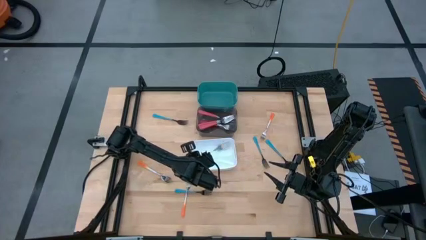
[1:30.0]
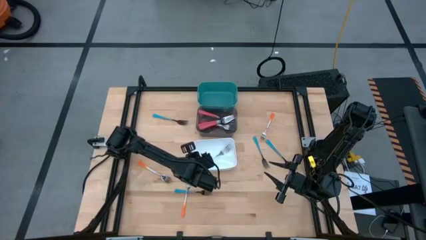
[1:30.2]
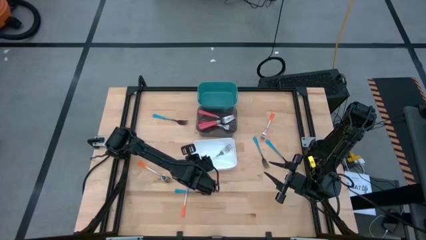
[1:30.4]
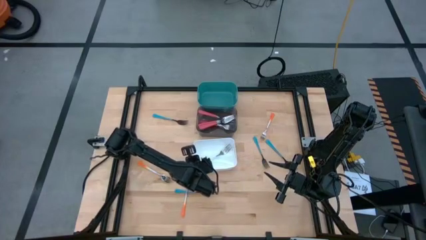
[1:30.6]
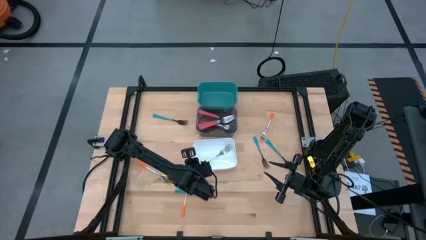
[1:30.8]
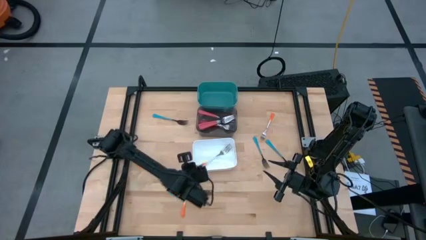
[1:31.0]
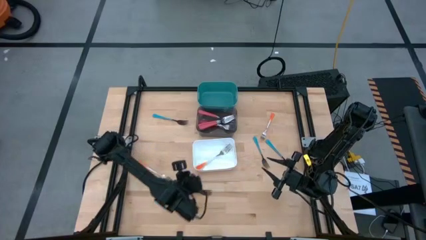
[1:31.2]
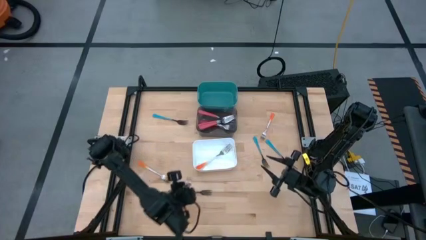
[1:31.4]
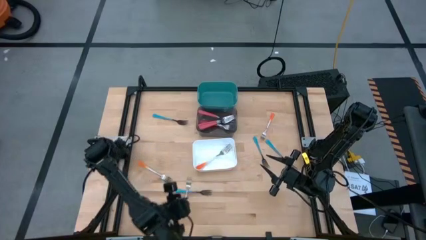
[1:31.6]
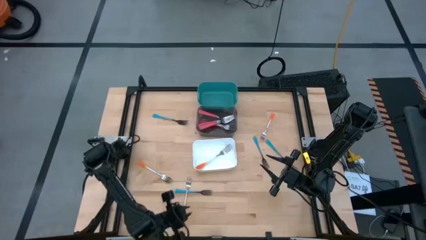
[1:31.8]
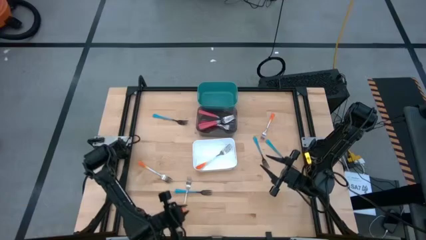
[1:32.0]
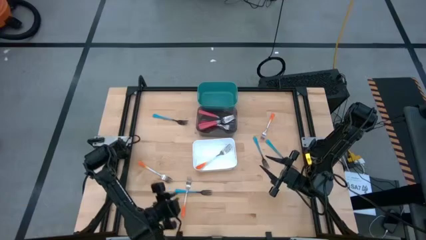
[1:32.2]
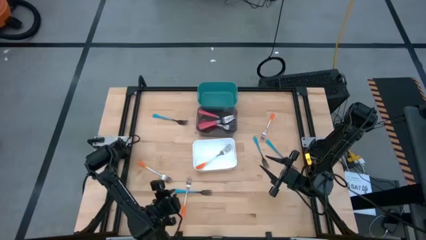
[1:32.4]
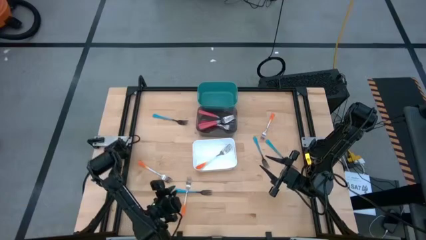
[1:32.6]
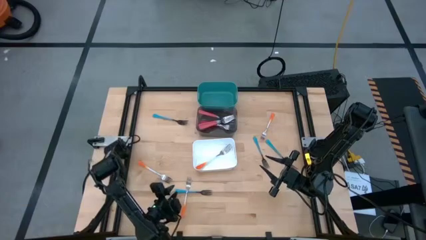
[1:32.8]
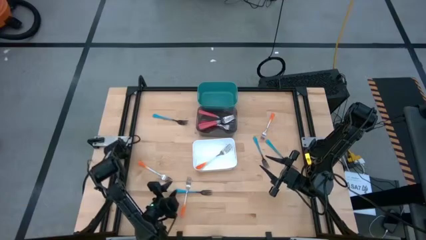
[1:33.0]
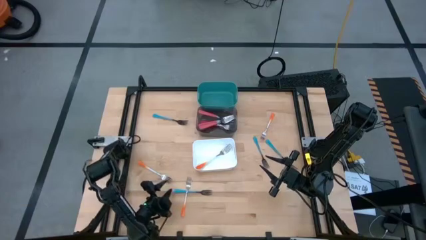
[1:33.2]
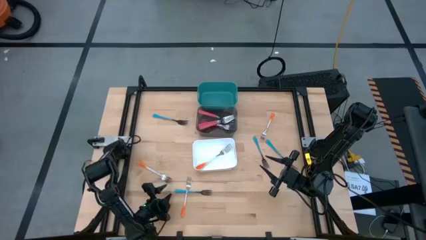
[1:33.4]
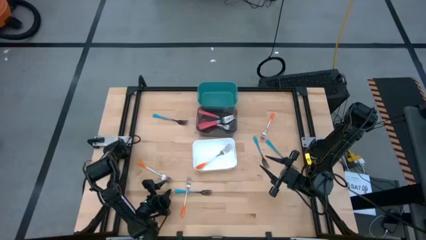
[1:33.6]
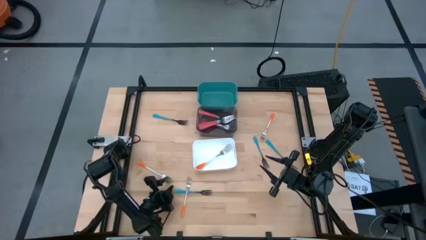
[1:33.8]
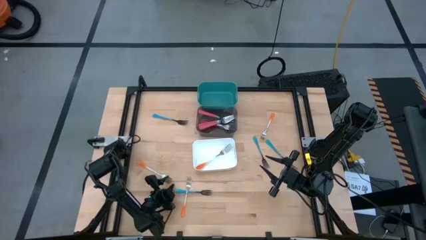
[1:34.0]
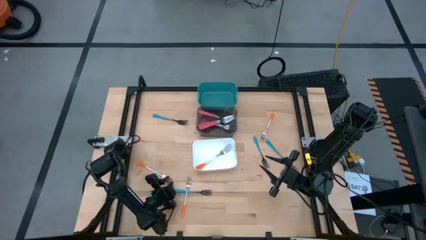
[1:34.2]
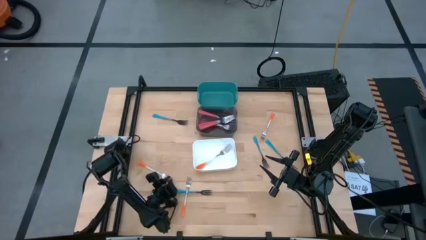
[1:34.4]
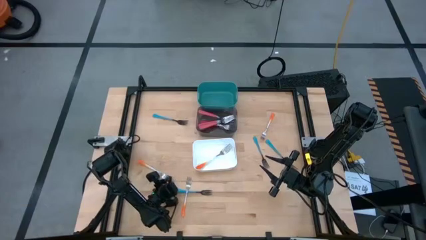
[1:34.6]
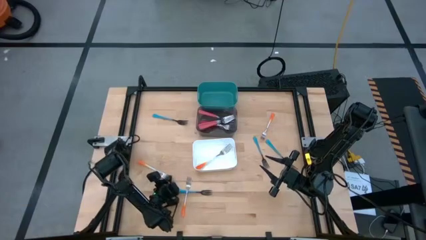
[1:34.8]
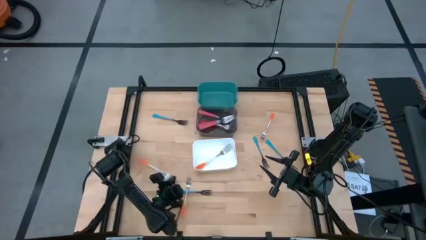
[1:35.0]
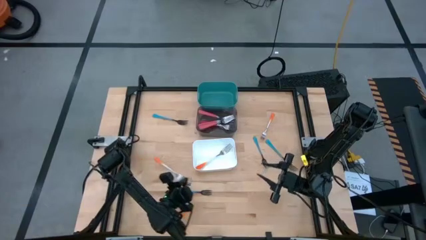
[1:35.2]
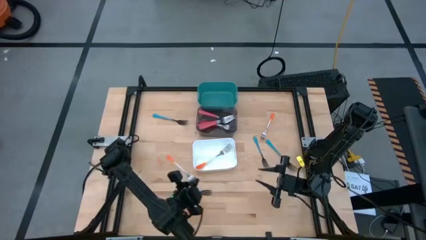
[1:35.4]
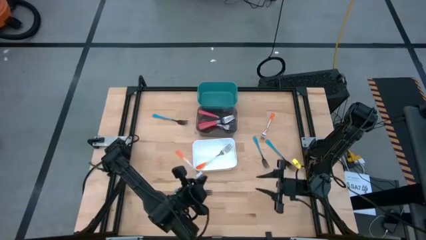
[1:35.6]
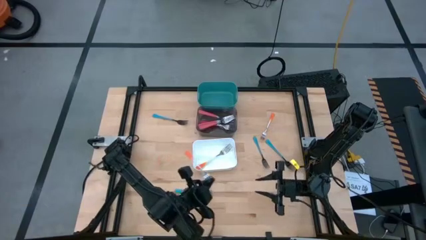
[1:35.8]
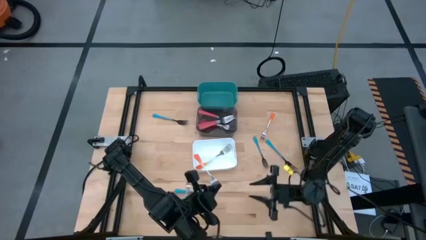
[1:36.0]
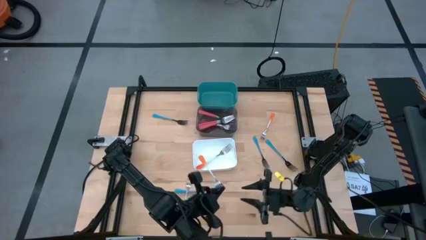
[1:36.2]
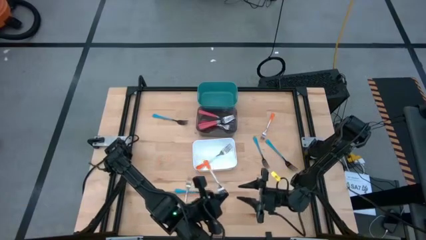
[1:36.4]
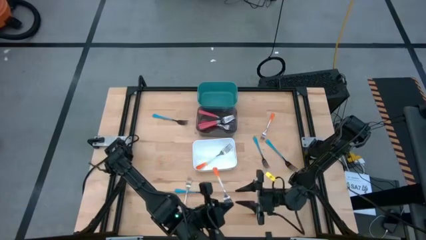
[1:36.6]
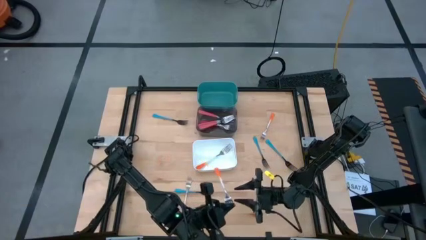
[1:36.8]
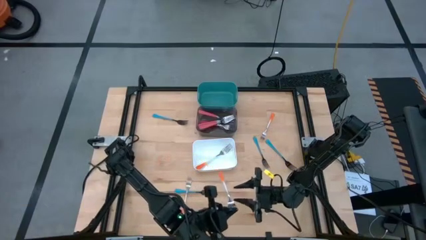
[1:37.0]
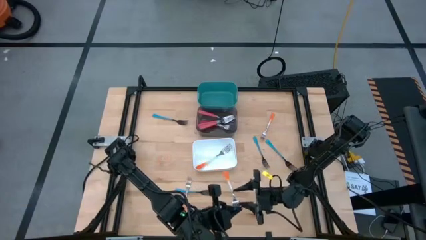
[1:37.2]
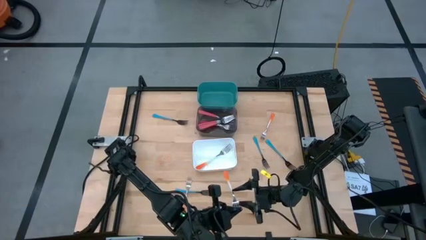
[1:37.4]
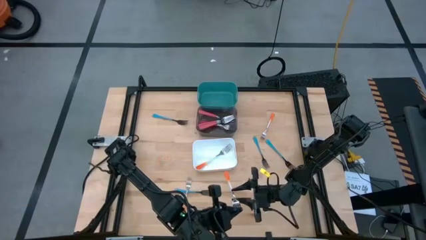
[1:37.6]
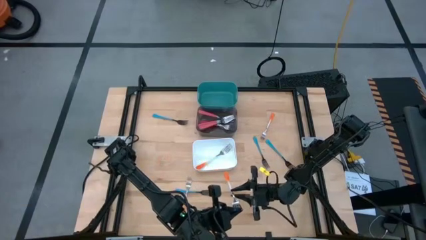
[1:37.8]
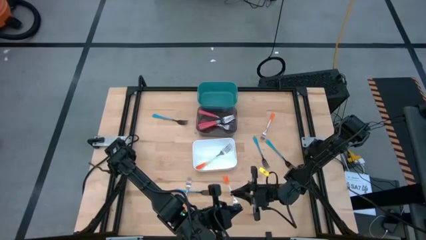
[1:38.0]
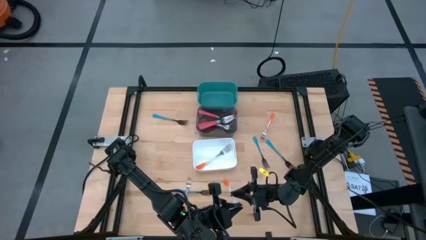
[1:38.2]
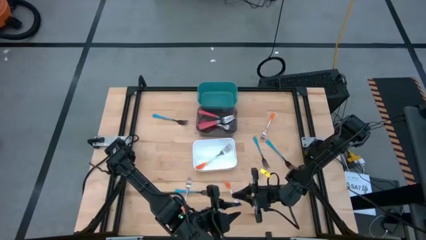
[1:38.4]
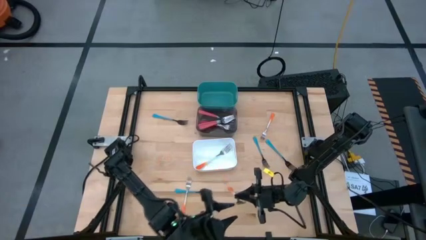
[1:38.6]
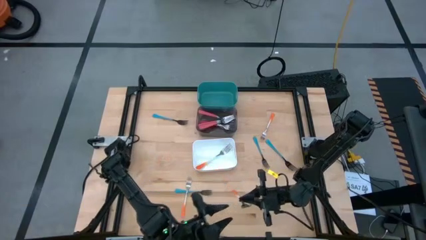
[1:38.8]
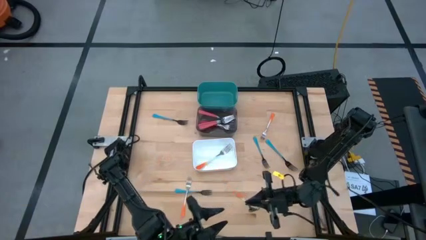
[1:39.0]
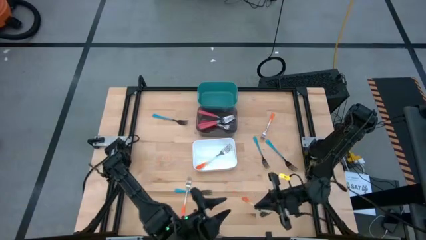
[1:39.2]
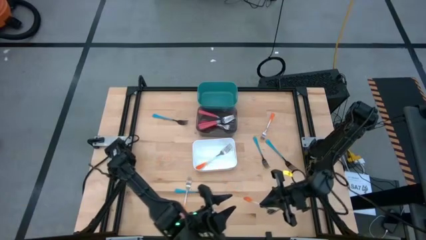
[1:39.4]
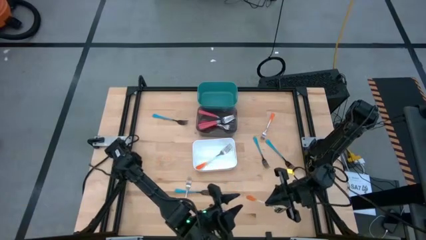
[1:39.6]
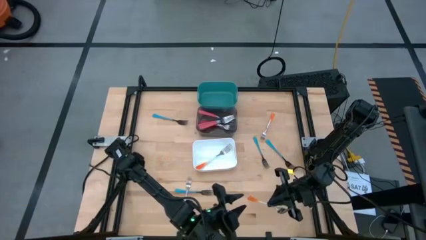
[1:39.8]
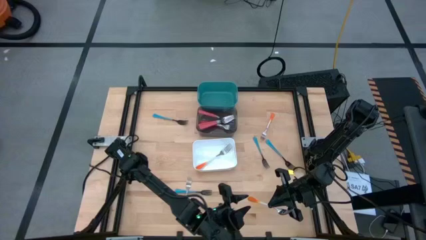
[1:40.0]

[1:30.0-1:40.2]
Task: Sort silverware by color (type)
Put the left orange fork into the white bin
